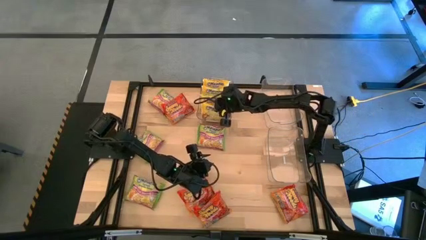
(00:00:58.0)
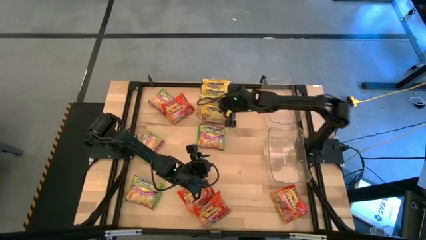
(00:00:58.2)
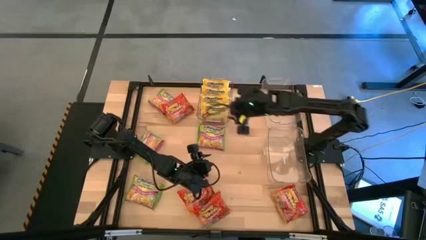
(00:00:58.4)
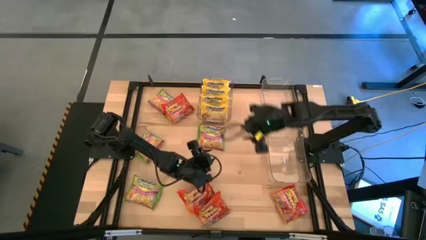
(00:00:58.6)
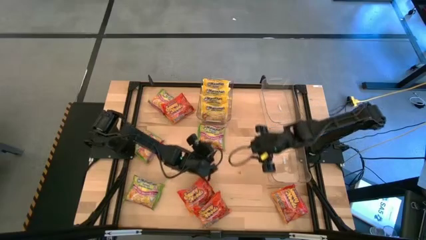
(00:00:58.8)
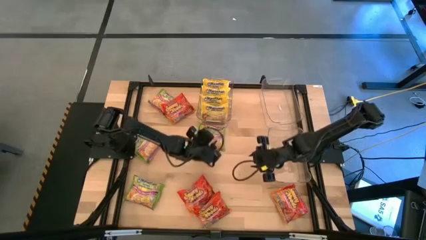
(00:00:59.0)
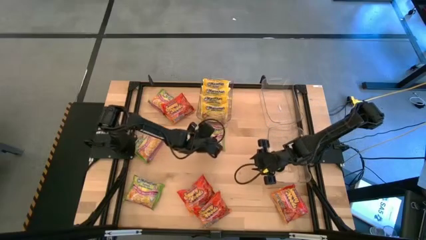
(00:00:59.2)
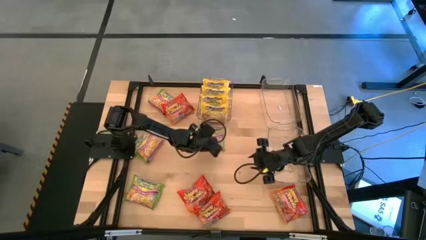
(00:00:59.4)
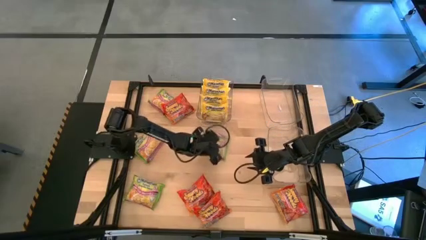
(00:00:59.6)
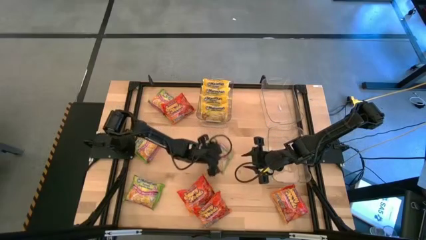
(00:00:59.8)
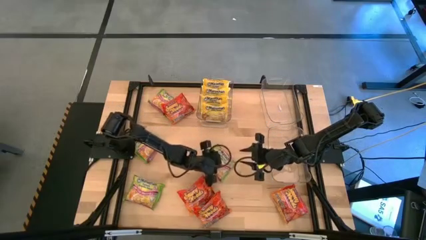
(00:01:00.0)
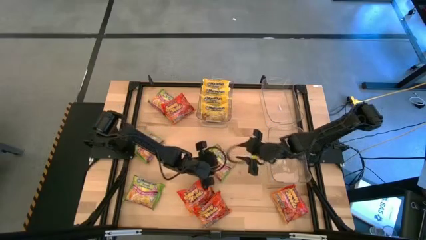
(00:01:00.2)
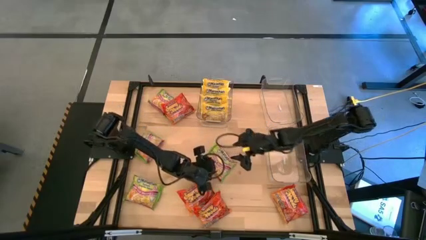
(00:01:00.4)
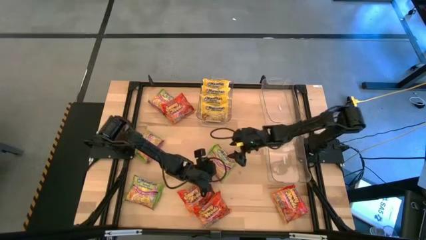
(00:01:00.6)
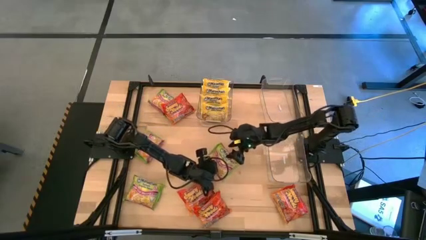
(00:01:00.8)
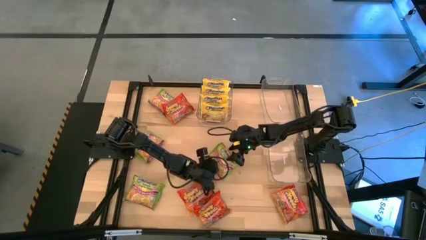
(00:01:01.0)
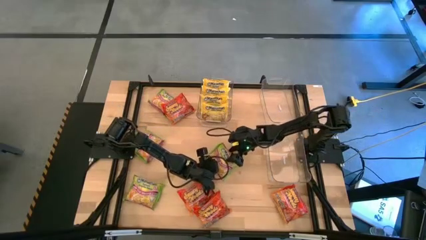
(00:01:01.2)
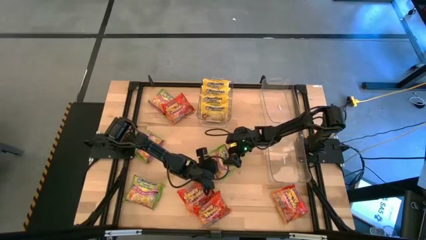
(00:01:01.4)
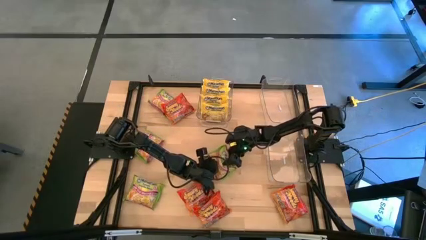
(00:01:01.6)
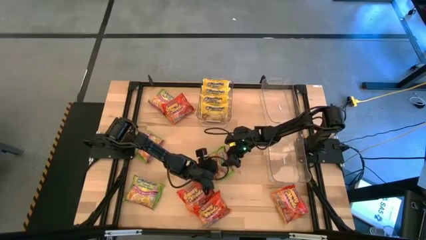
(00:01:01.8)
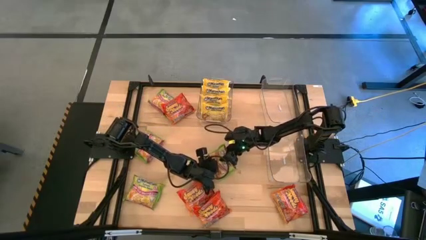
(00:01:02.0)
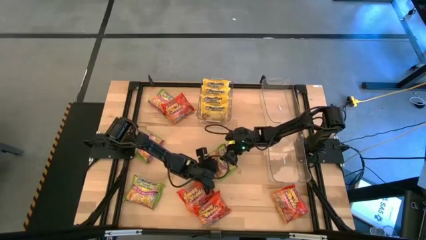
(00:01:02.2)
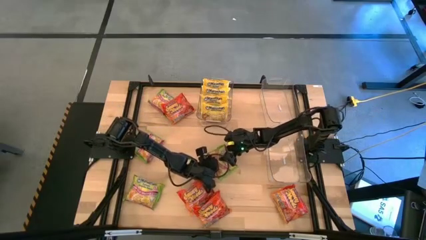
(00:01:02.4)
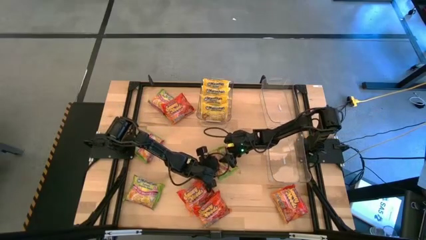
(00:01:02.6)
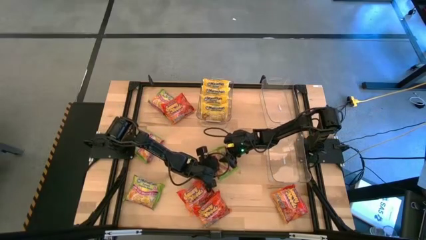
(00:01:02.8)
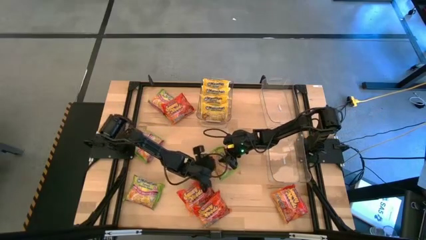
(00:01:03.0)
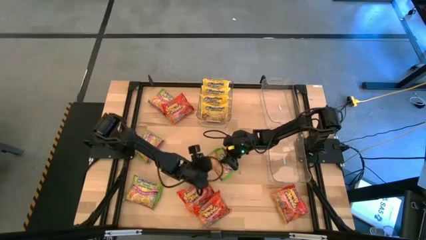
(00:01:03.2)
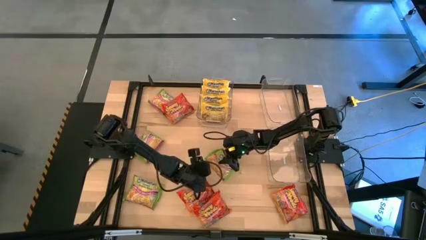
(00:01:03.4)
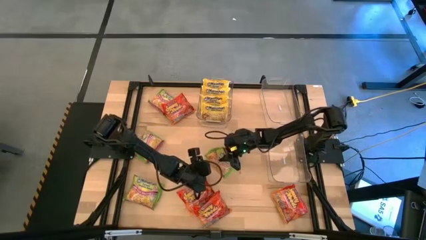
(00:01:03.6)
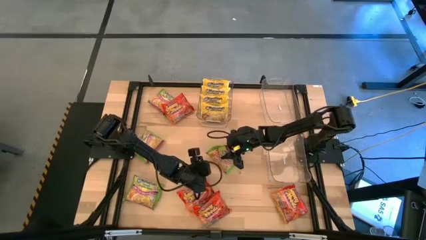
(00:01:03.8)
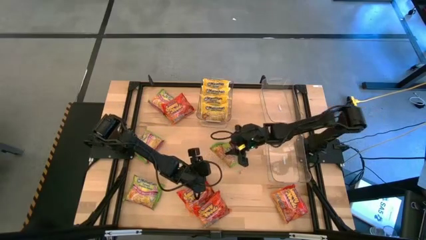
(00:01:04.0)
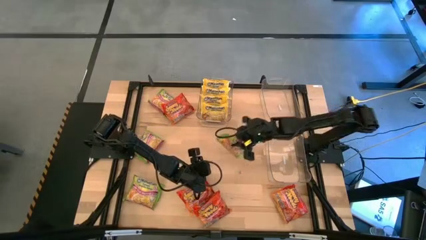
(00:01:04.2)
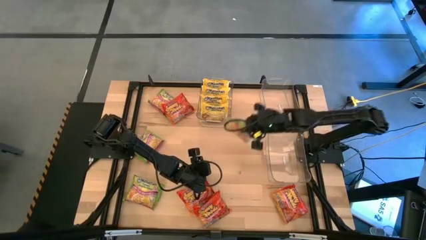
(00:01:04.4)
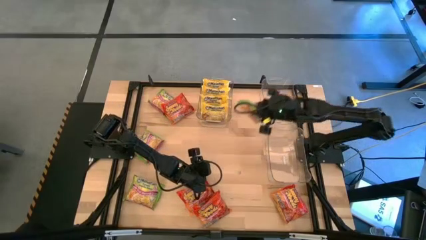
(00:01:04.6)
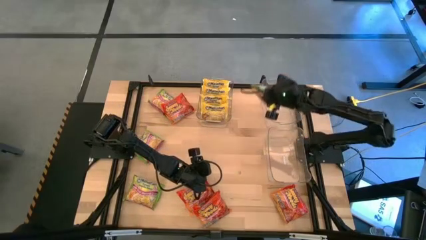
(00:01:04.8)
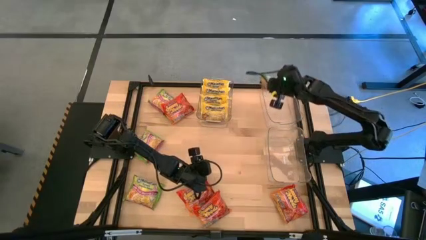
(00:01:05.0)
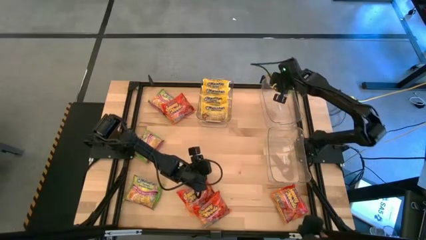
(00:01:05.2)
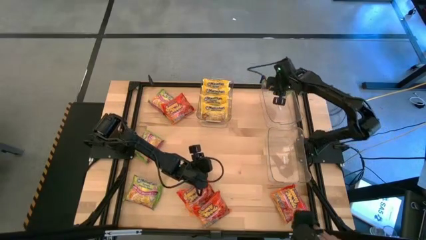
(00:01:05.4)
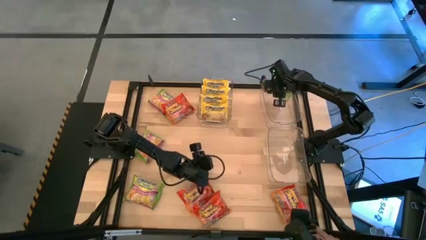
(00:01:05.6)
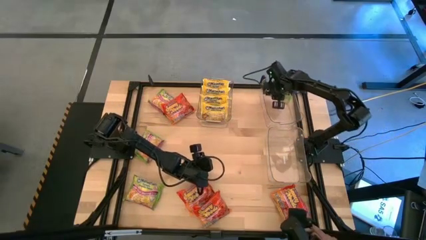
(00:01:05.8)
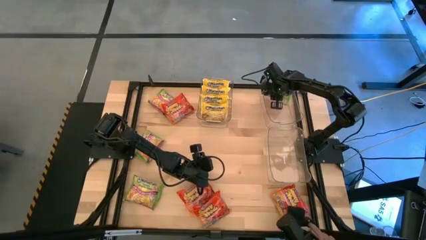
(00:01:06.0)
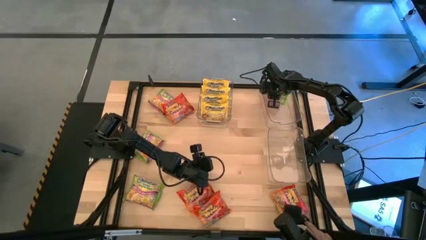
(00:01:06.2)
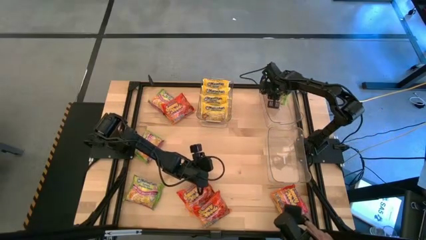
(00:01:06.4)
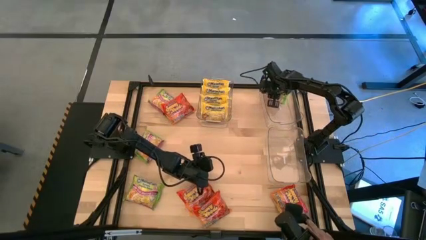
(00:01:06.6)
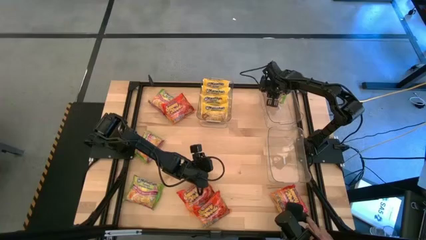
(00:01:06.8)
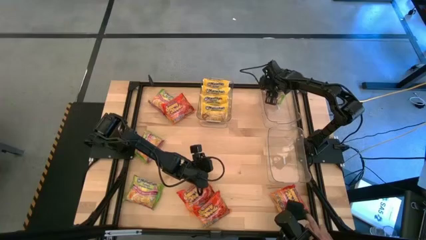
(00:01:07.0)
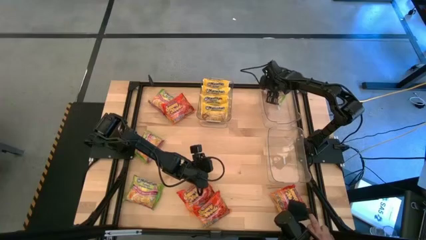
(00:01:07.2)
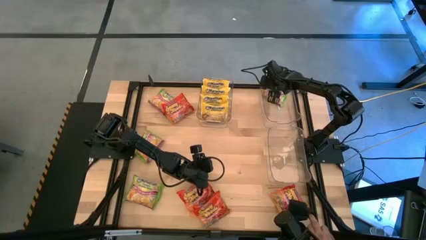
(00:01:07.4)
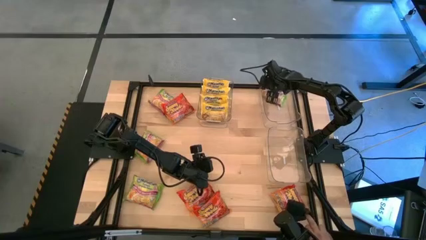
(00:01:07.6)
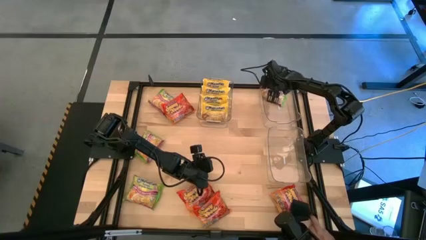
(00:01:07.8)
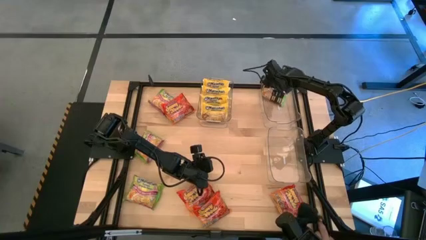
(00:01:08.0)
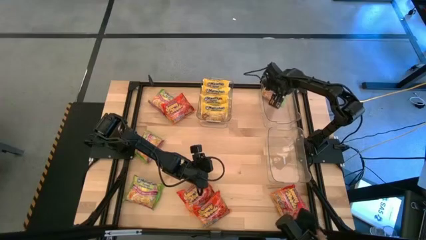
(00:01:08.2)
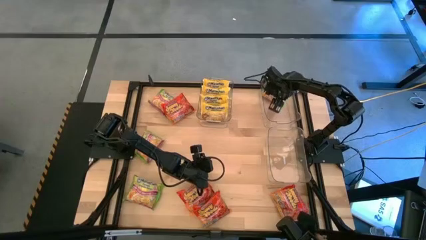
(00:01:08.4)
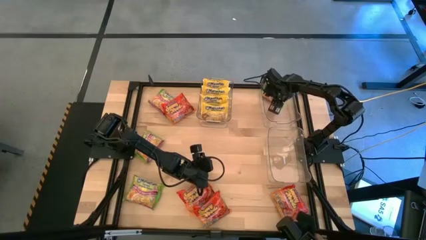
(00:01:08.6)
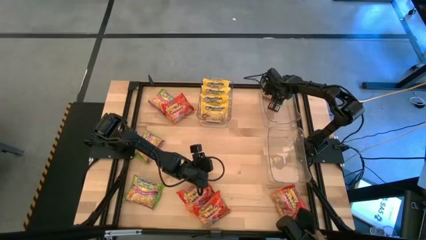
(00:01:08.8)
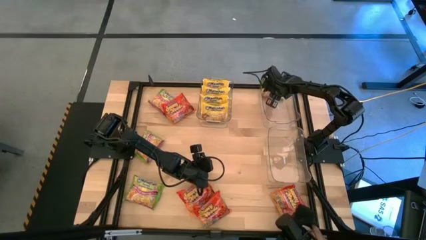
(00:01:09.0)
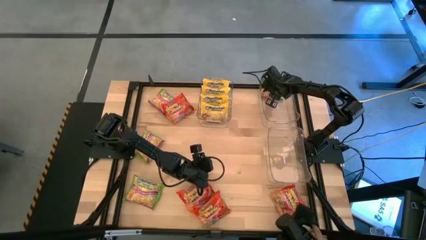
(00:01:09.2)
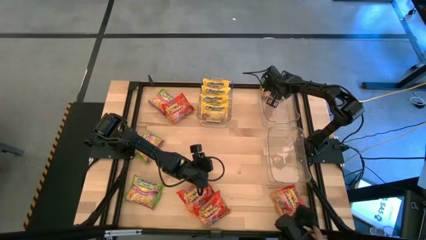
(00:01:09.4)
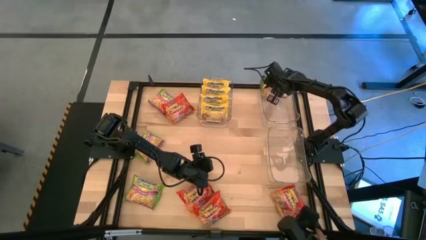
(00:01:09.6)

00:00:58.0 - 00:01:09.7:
Task: Sort Maruchan noodles
Put the green noodle pack into the top right transparent bin
